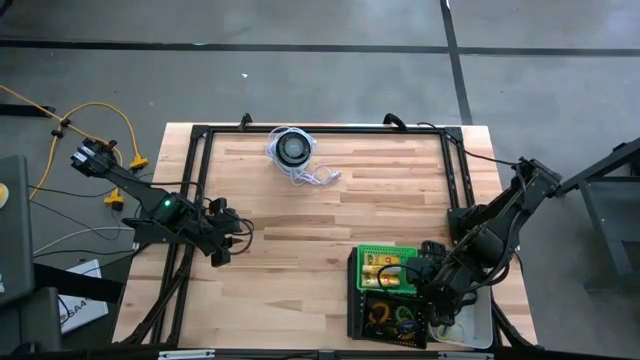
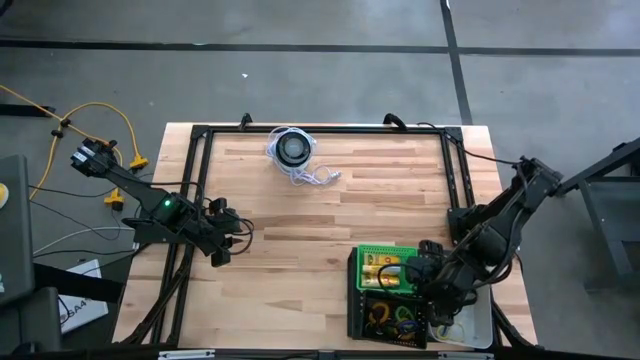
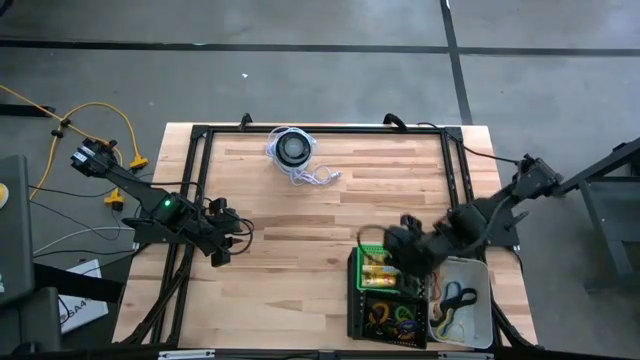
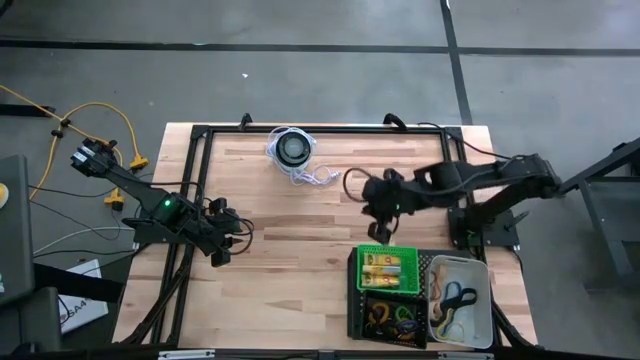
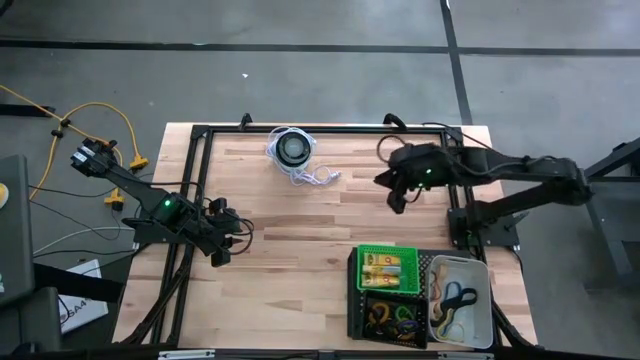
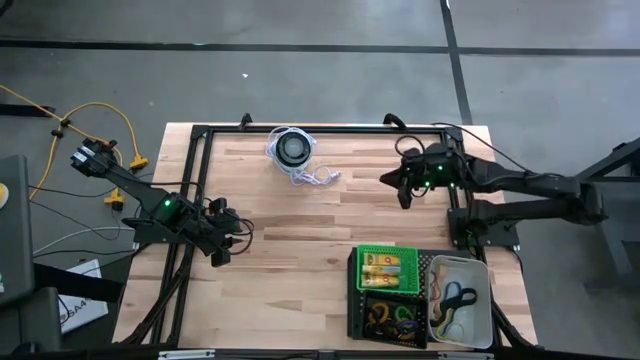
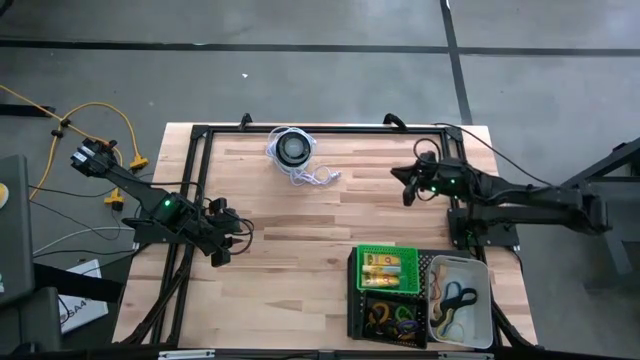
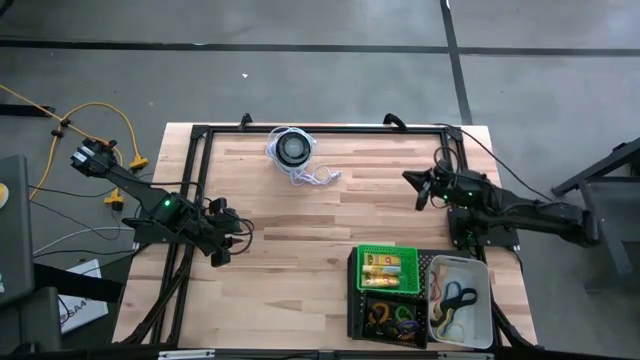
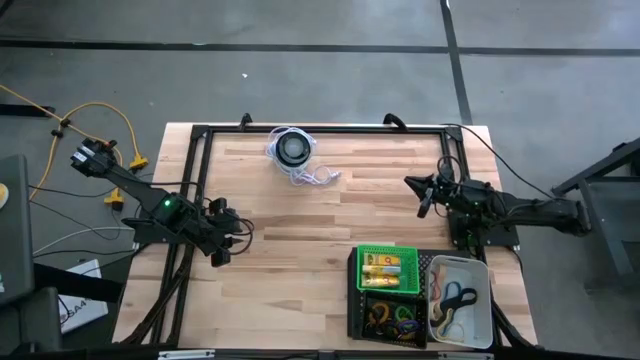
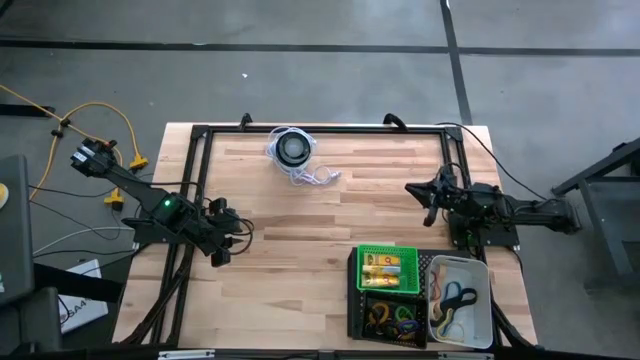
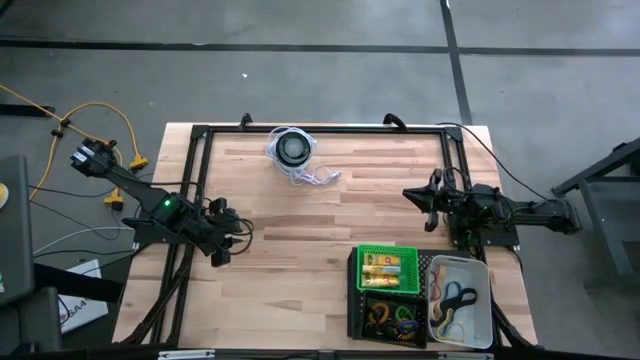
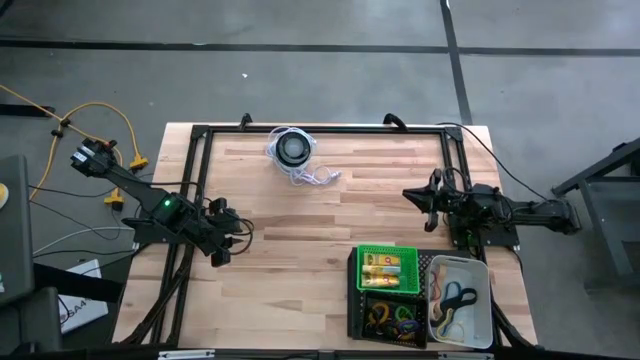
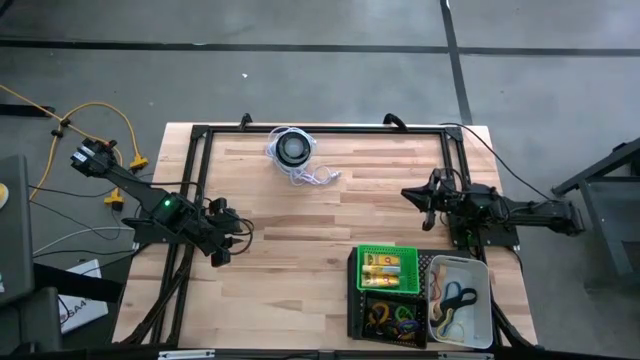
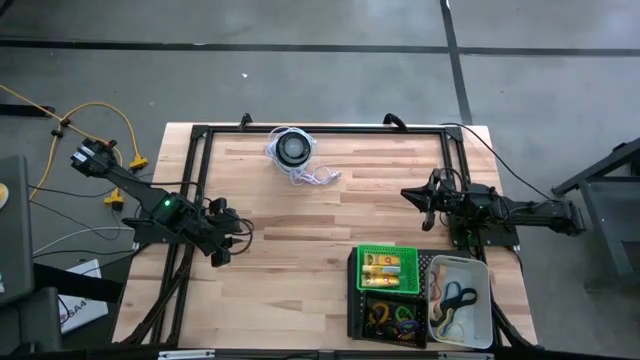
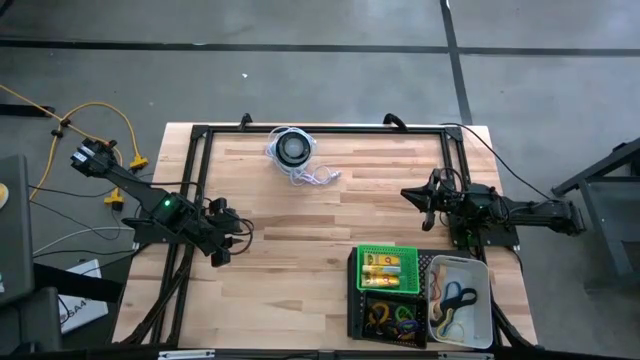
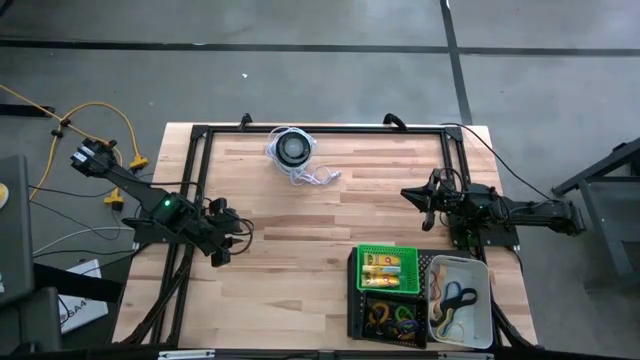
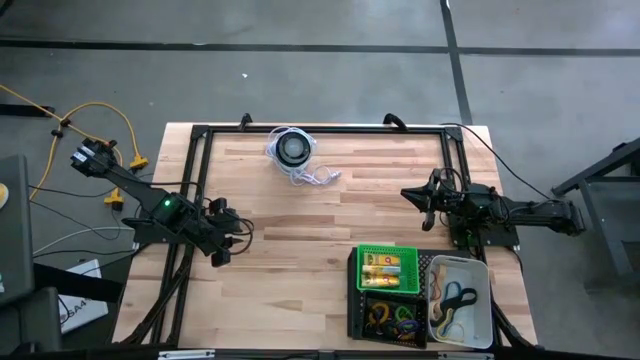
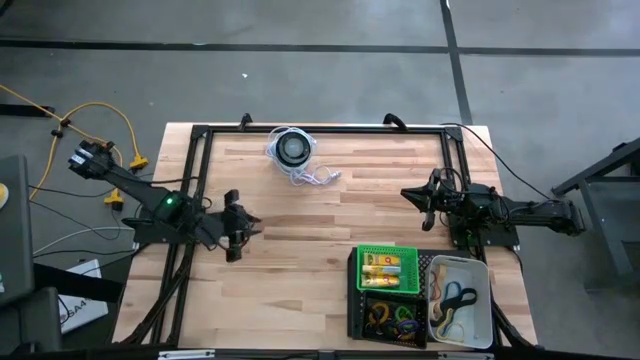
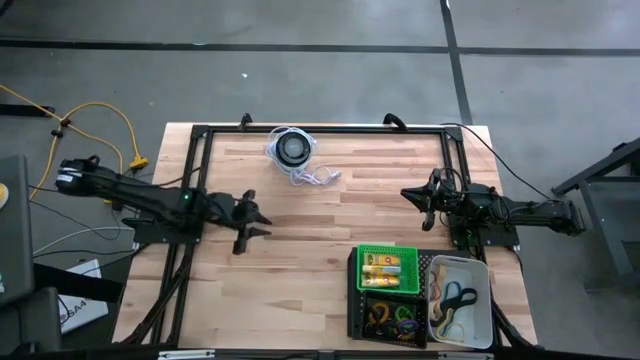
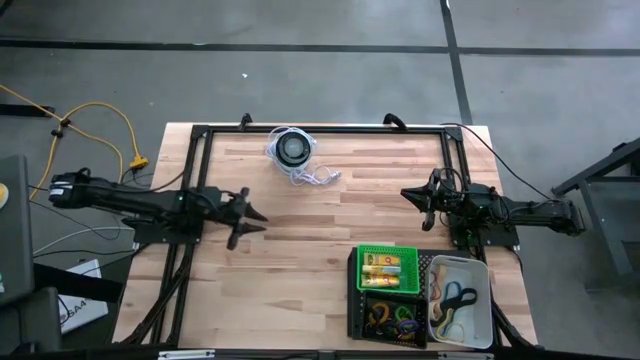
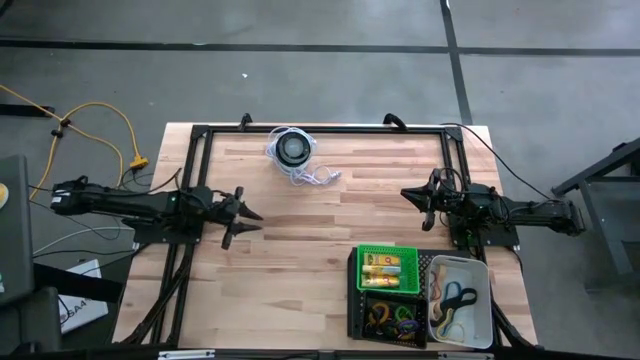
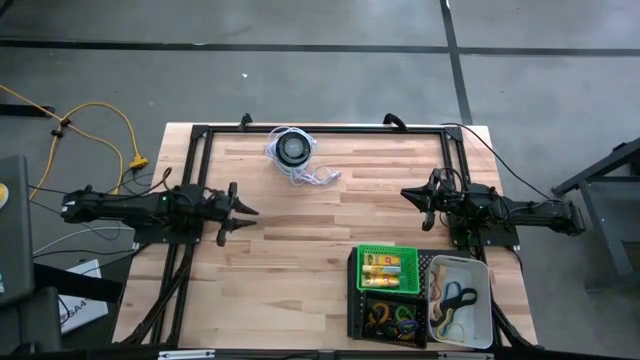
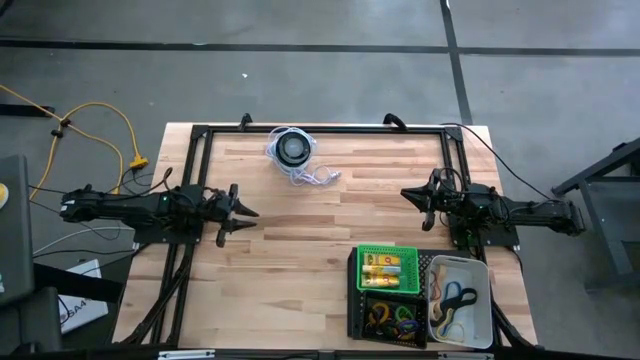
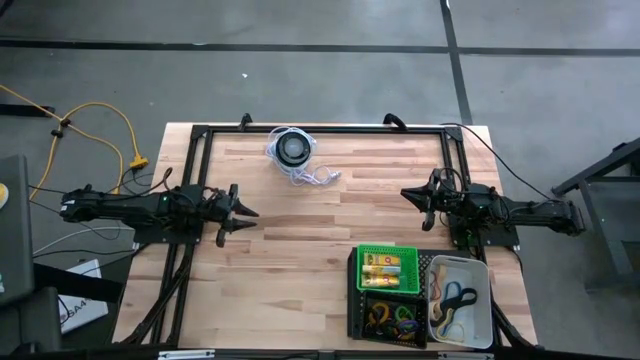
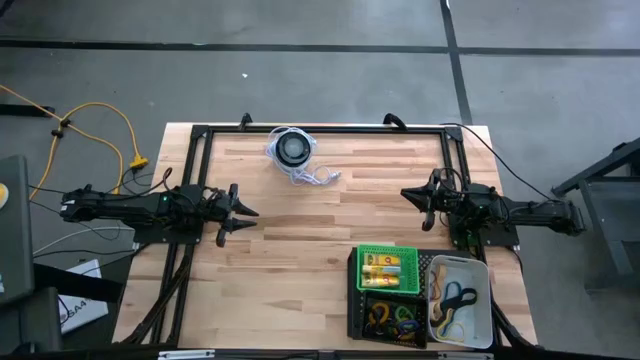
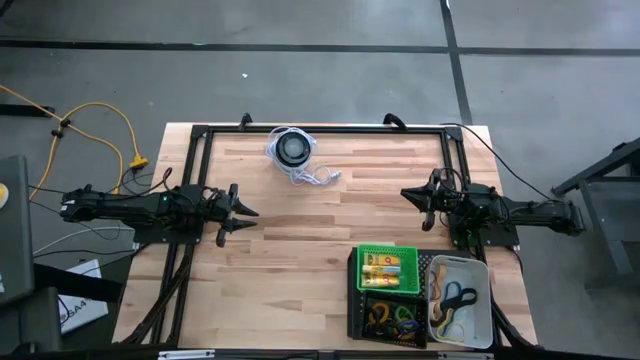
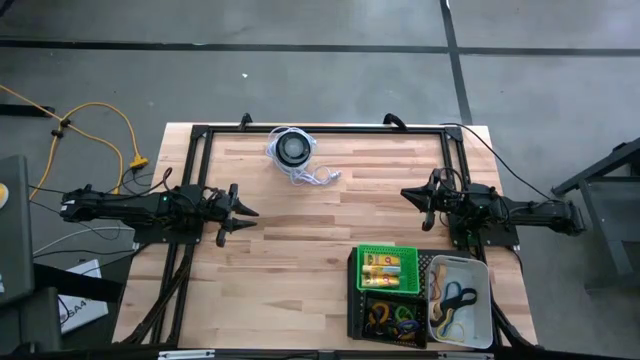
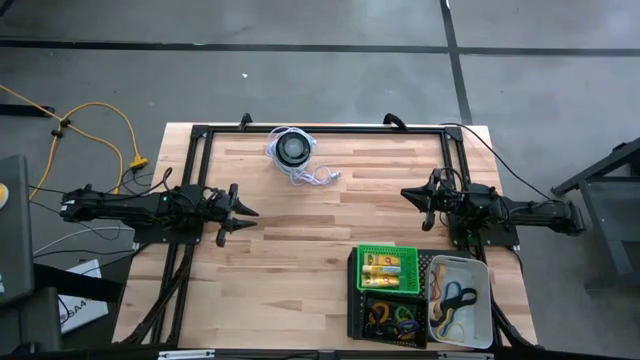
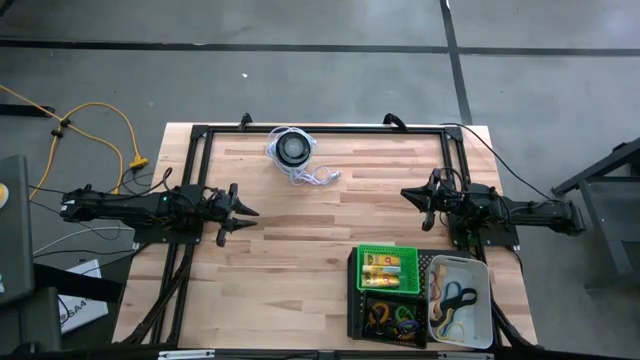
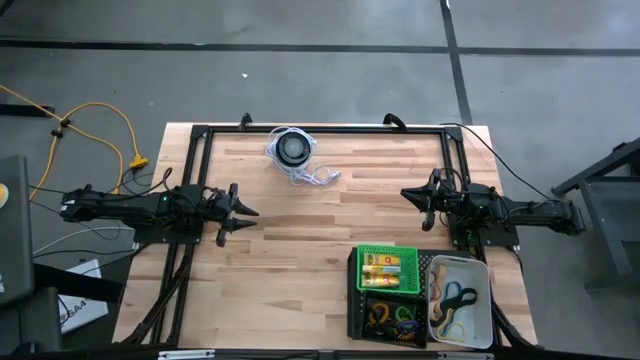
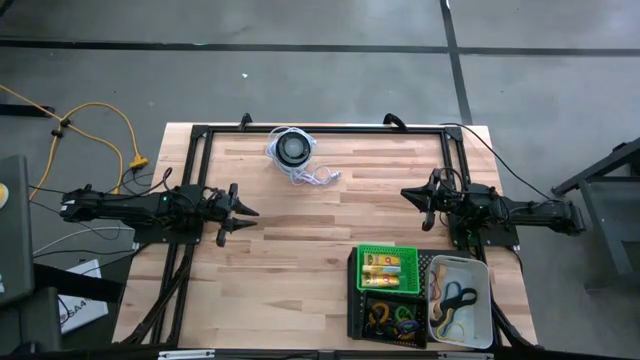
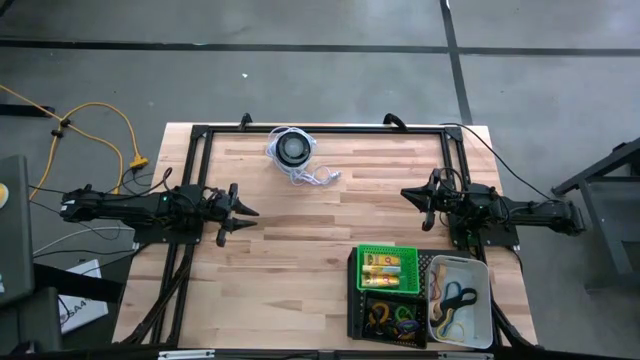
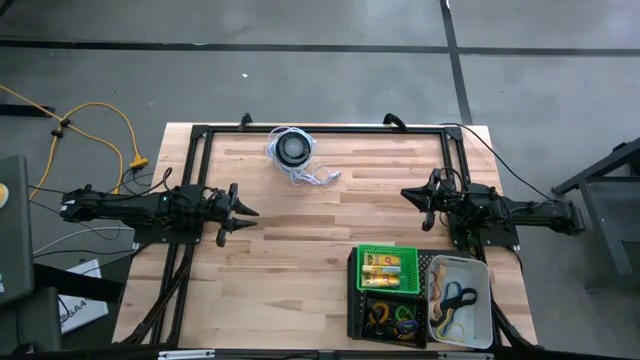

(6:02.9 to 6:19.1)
Task: Pick & Place Office Desk Supplies
Return to Home Position

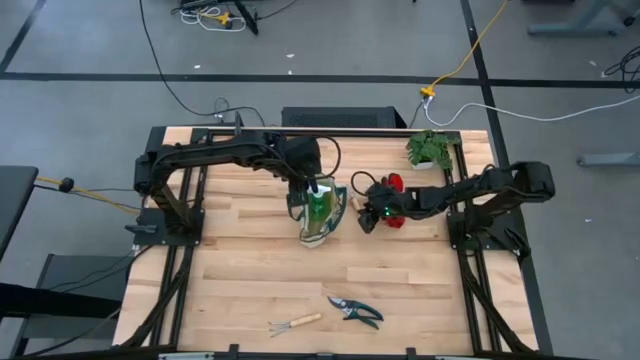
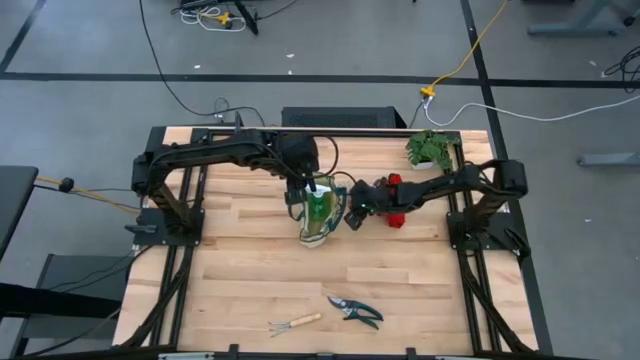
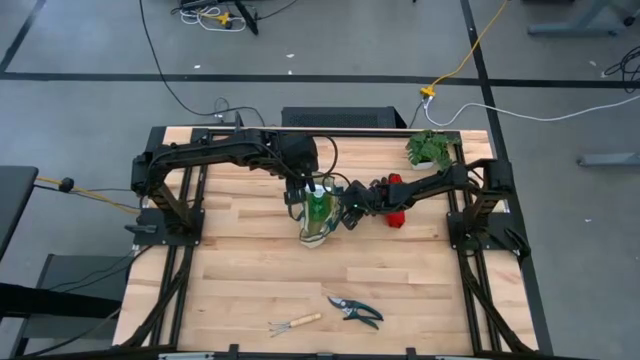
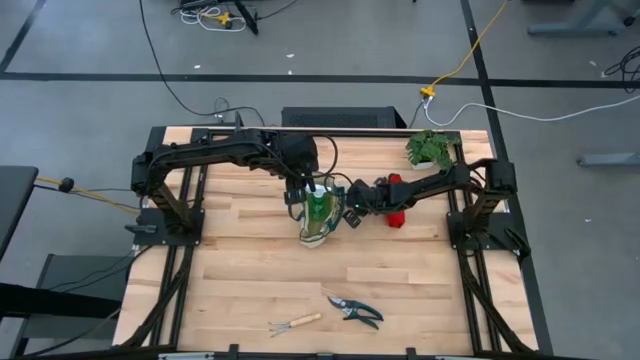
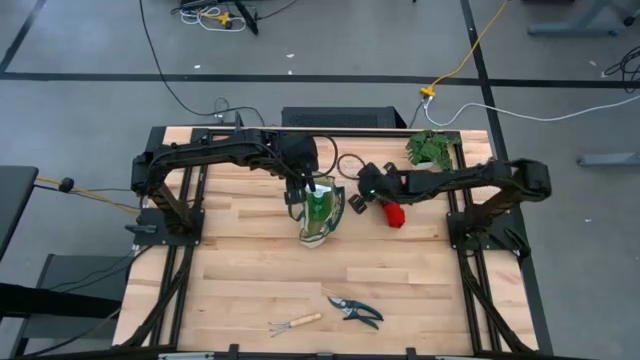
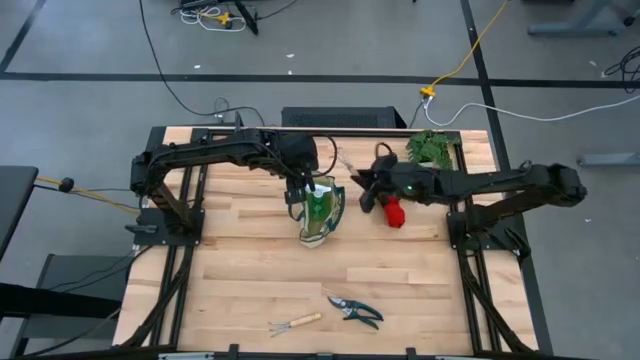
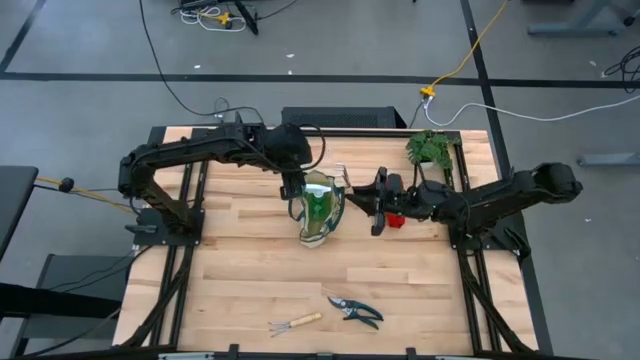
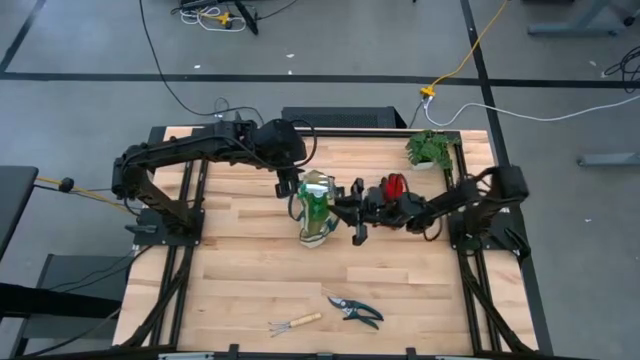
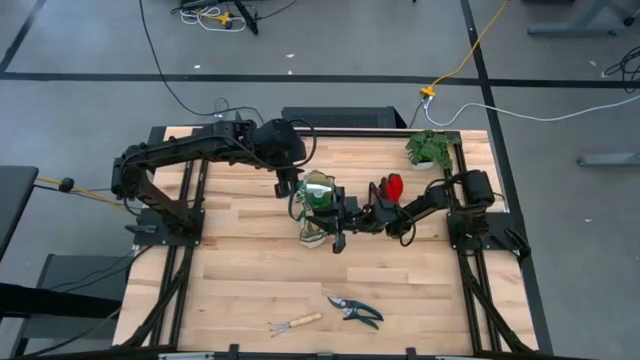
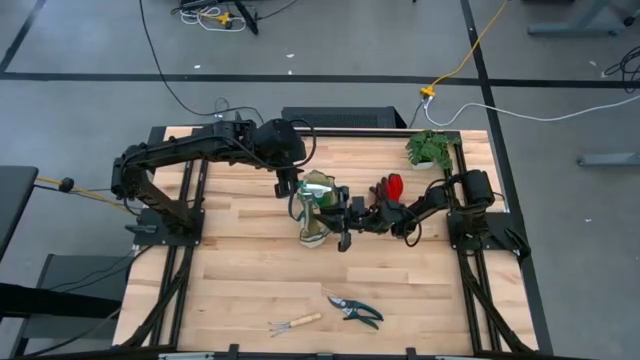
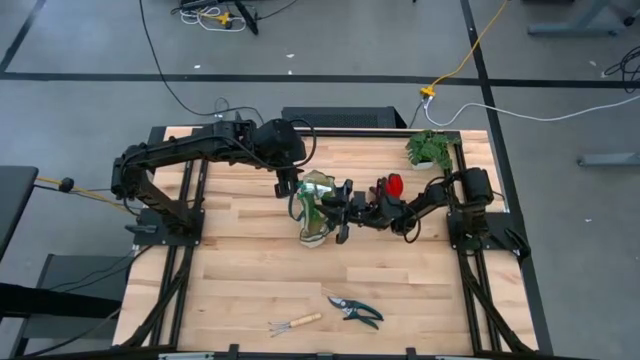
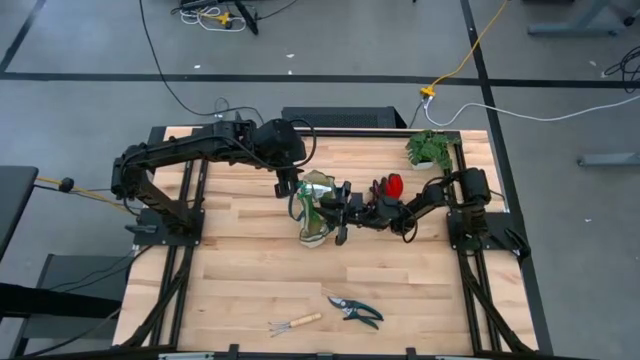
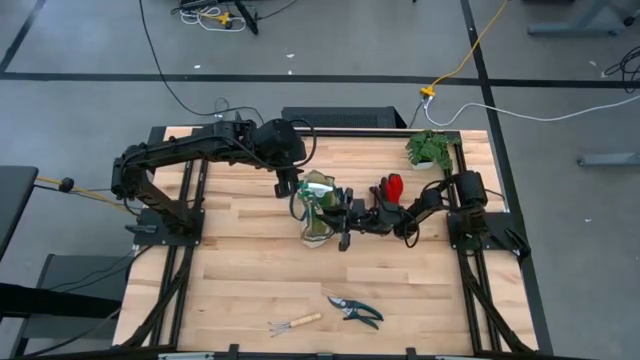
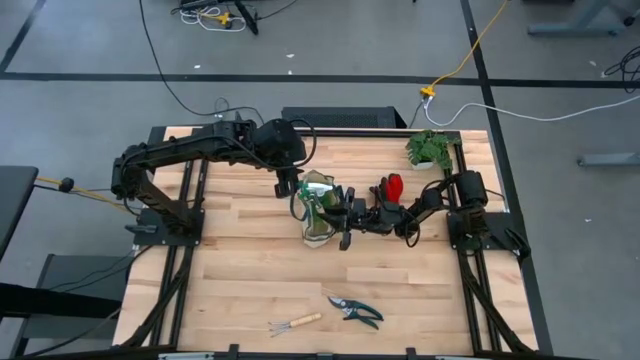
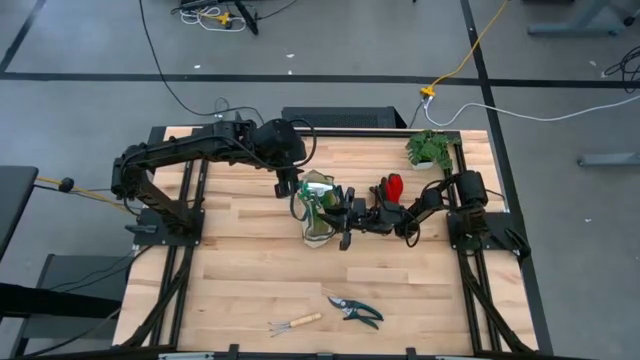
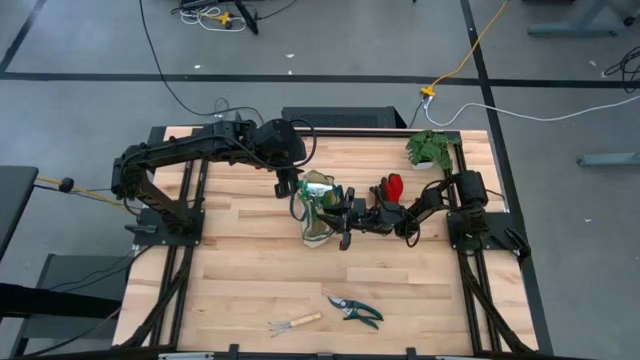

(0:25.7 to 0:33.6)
Task: Pick & Place Garden tools in Gardening bag
Put the top brown hand rake into the brown gardening bag
